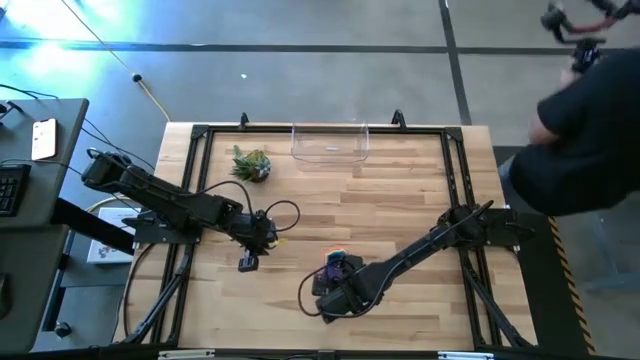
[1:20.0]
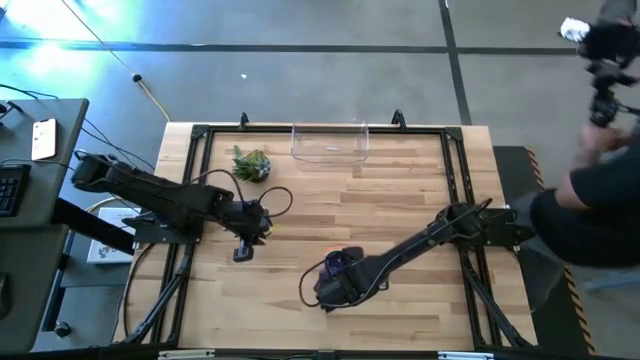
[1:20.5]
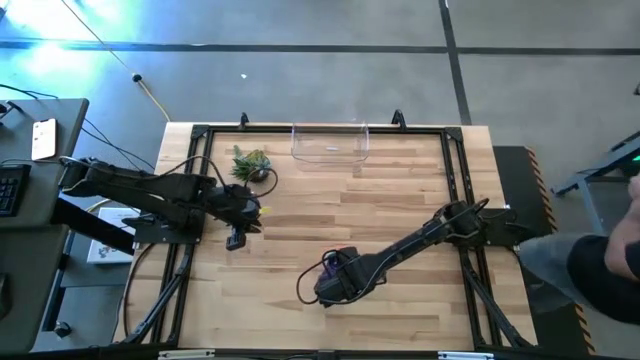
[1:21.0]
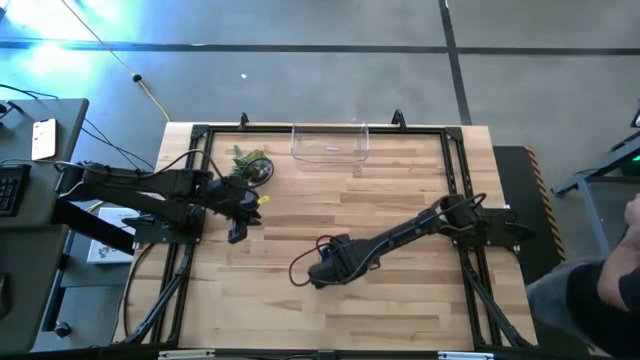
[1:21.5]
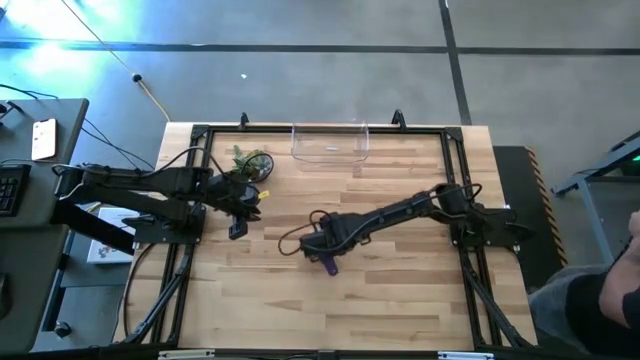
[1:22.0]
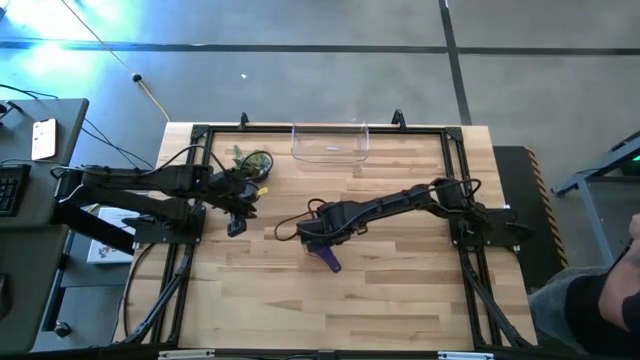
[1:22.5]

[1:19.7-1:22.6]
Task: Nest measuring cups in basket
Adjust the stacked measuring cups

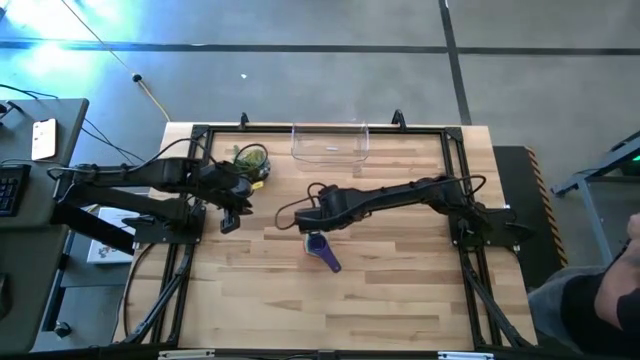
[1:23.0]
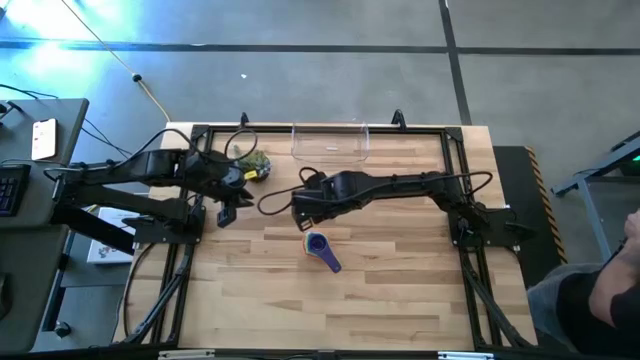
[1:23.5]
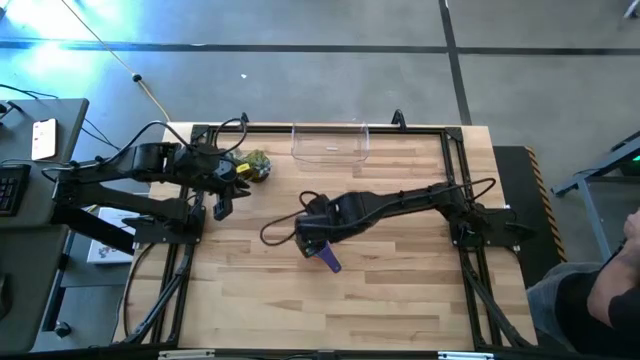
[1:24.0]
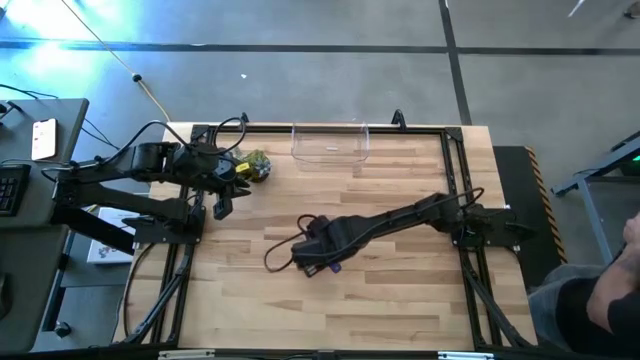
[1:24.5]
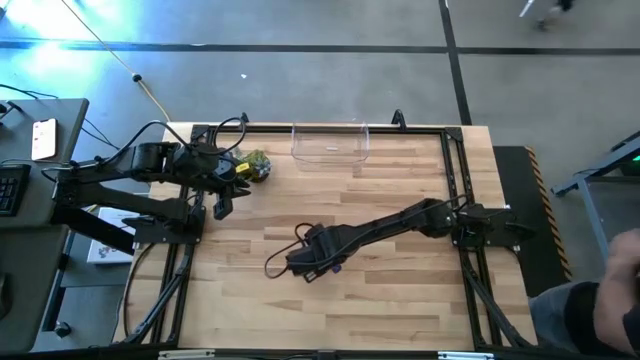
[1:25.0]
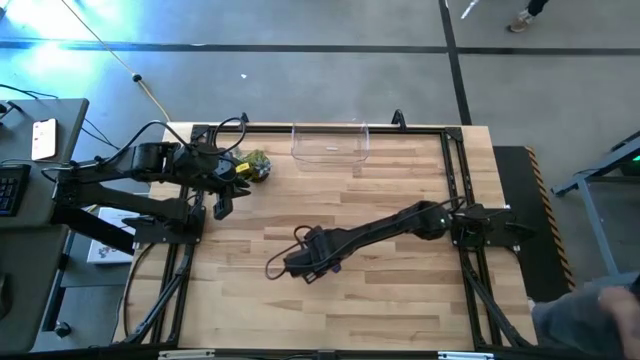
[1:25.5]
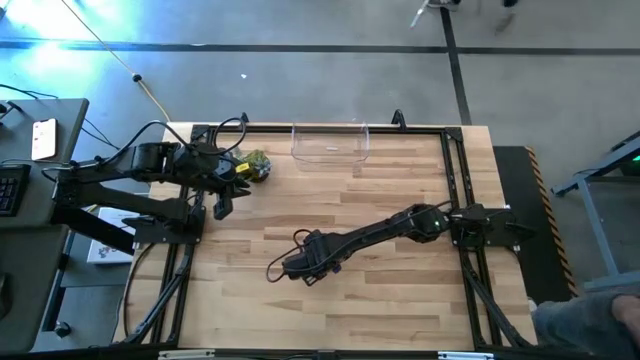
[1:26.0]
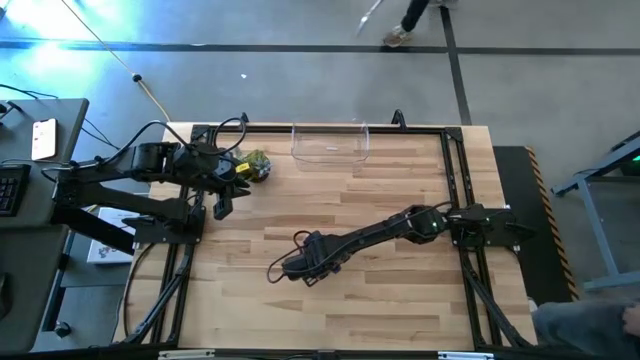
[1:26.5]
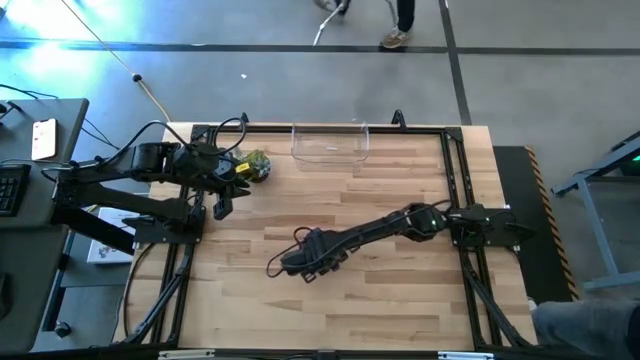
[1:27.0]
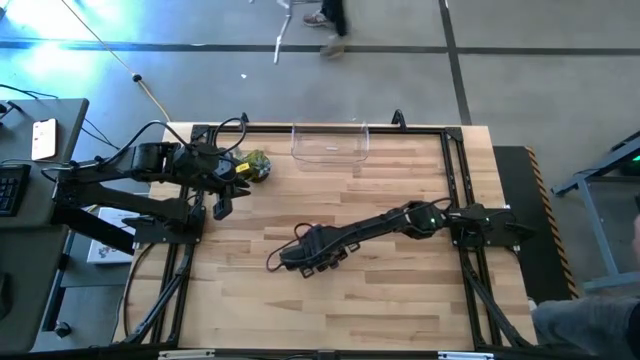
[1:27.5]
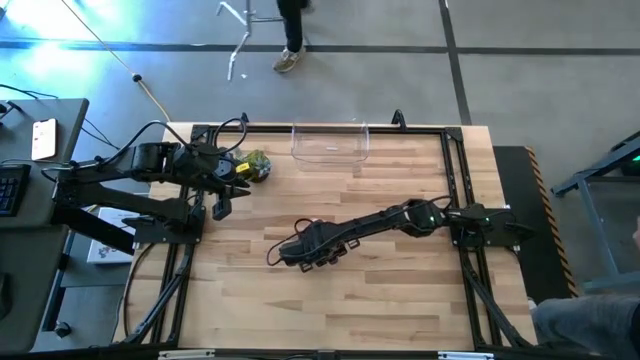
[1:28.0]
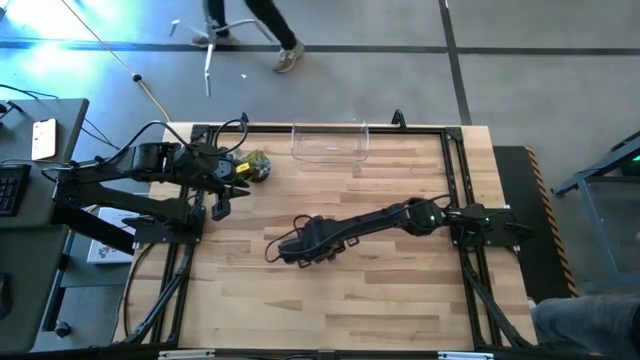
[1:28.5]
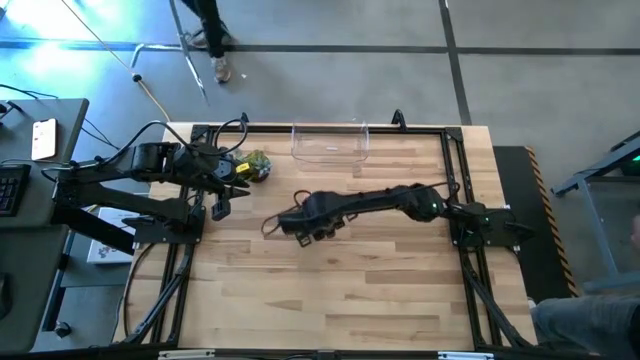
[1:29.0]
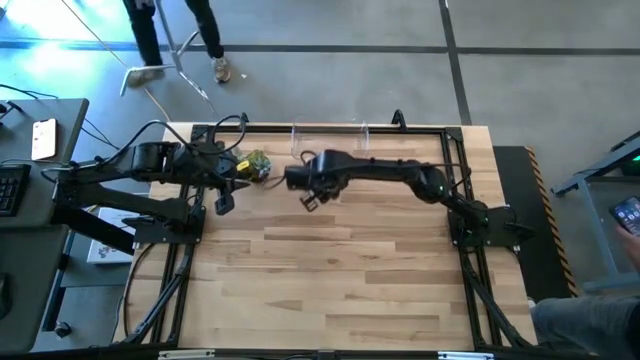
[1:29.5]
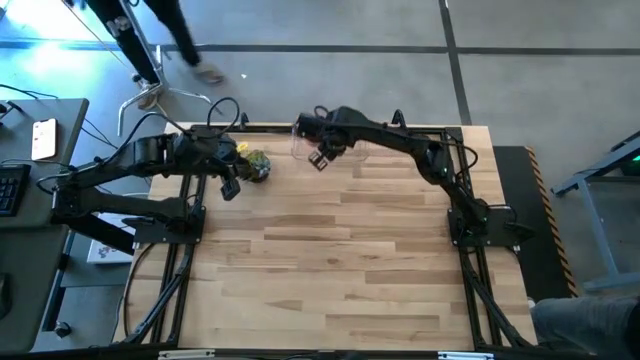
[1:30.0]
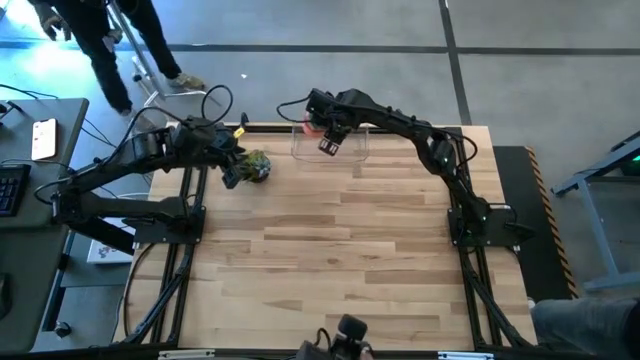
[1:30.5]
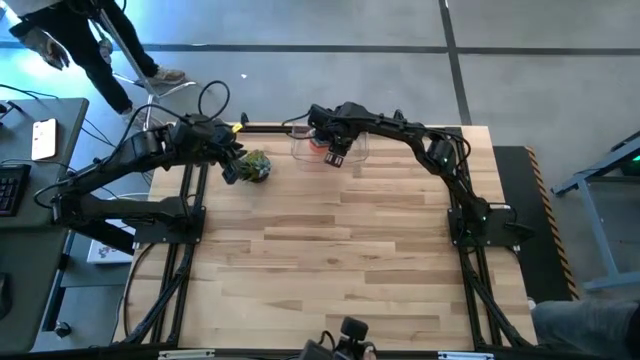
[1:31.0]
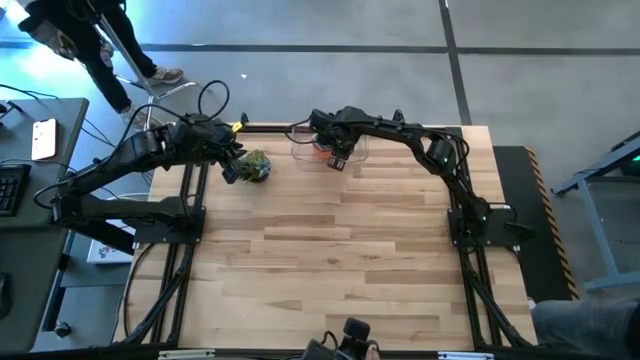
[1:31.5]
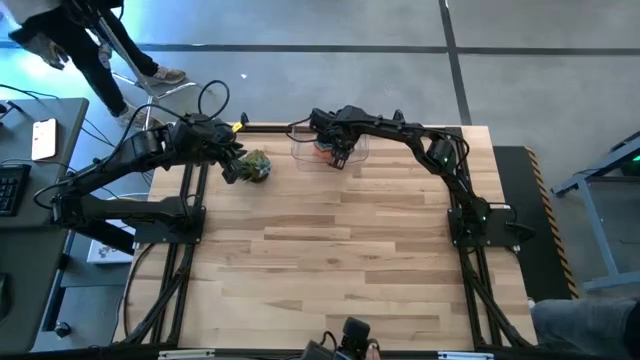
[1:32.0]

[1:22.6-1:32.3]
Put the stacked measuring cups into the transparent bin

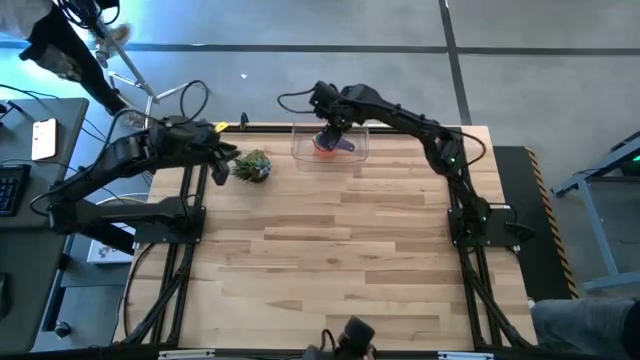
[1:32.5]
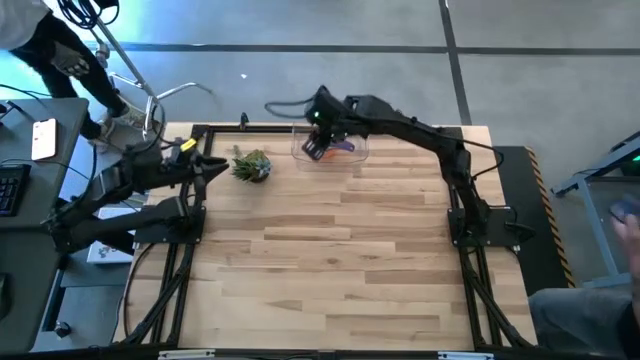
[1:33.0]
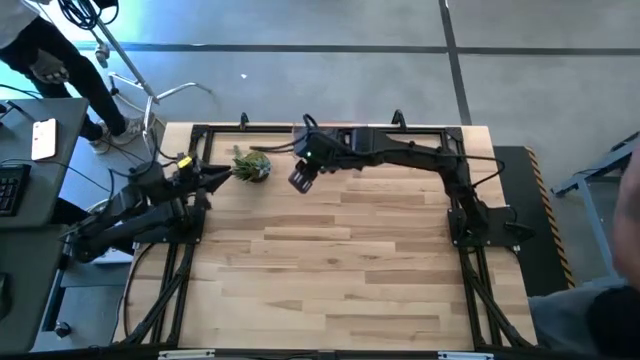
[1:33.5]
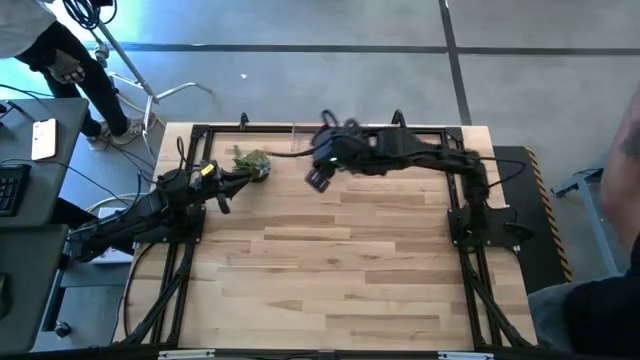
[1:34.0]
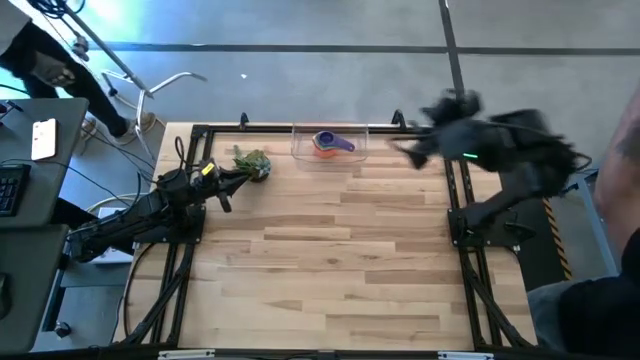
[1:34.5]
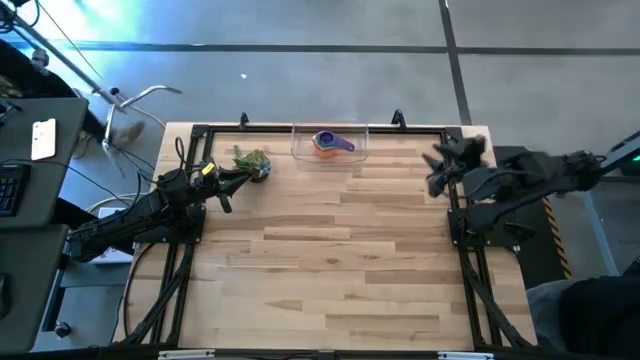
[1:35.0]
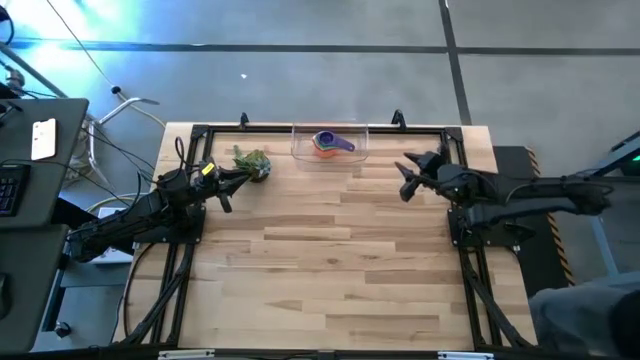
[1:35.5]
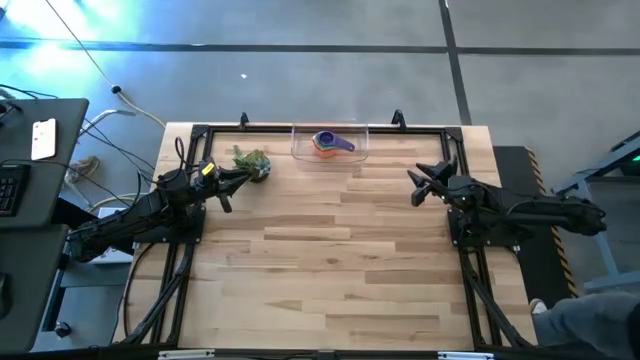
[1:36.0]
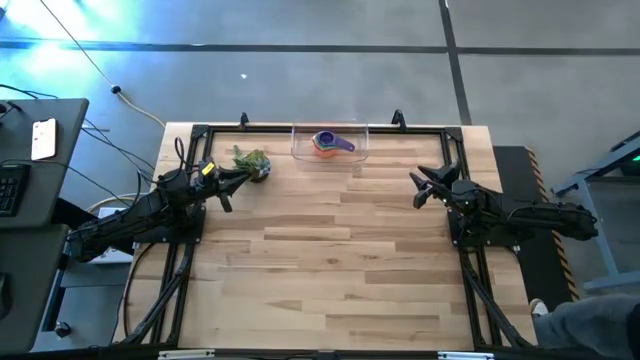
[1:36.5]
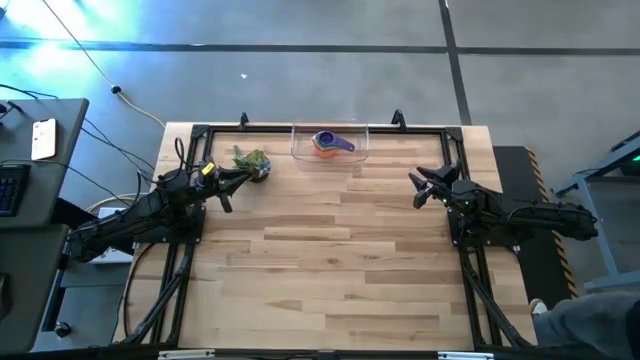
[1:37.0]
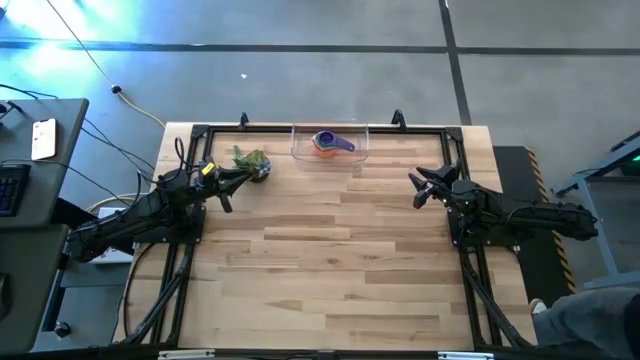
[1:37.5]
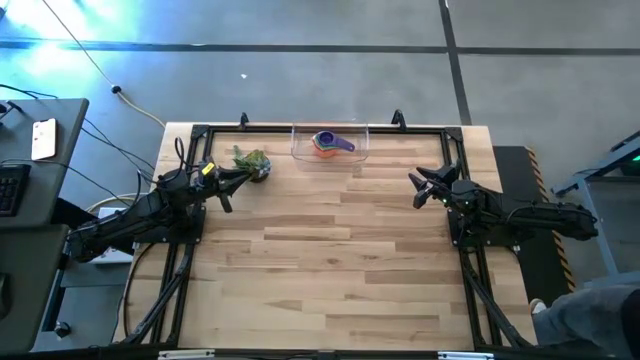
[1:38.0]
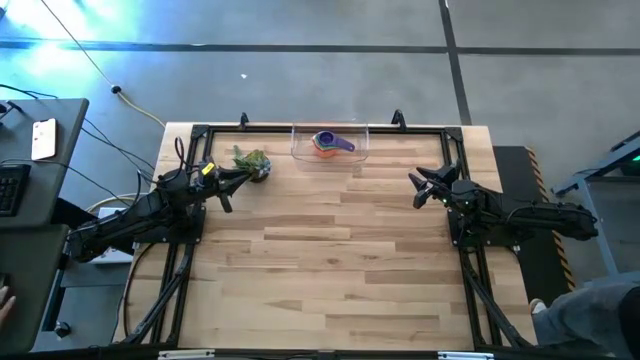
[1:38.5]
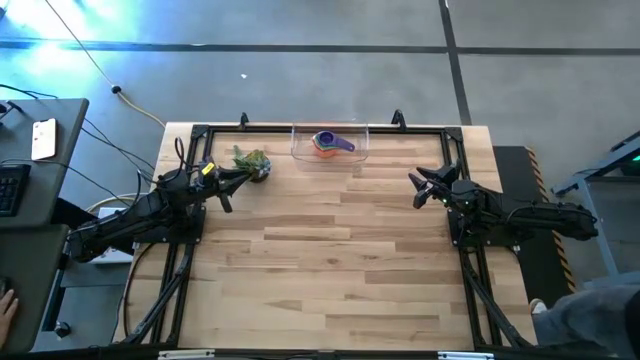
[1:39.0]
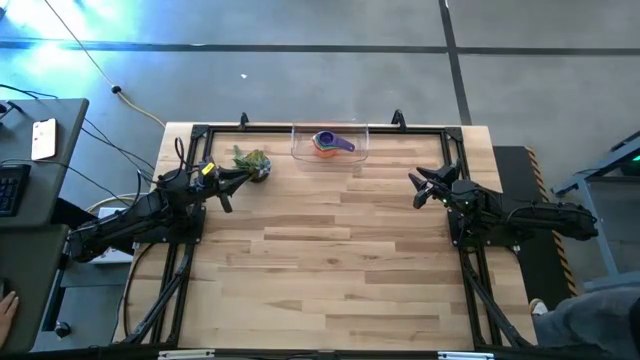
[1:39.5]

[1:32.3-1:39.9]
Return to Home Position
